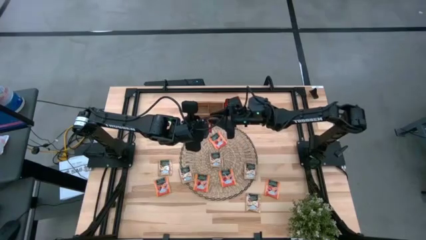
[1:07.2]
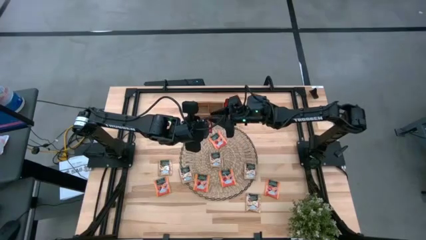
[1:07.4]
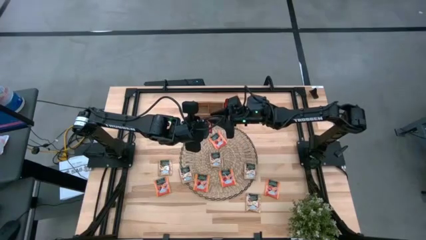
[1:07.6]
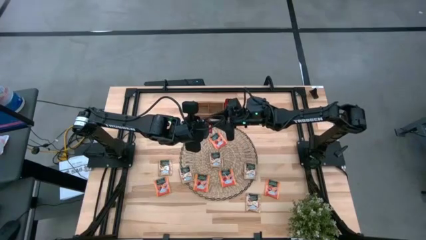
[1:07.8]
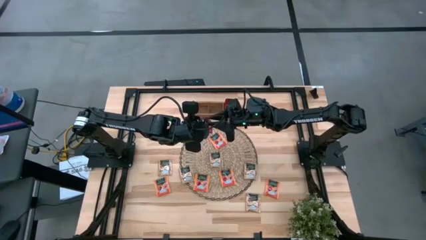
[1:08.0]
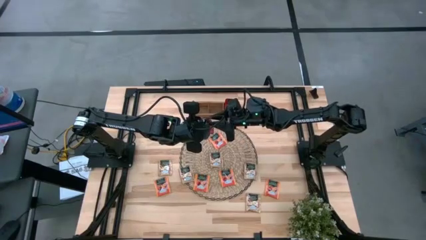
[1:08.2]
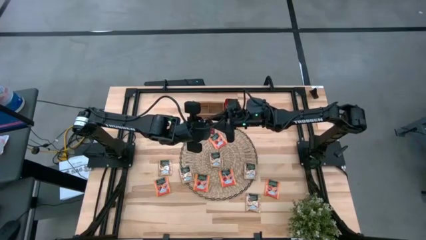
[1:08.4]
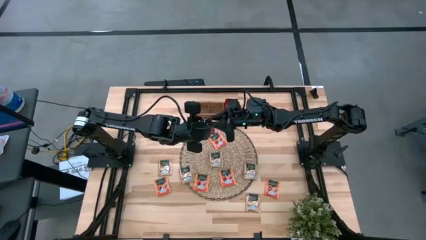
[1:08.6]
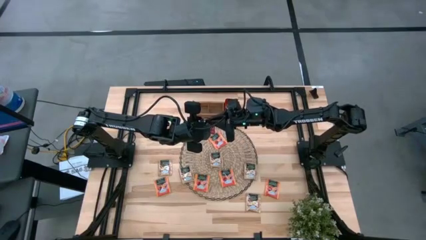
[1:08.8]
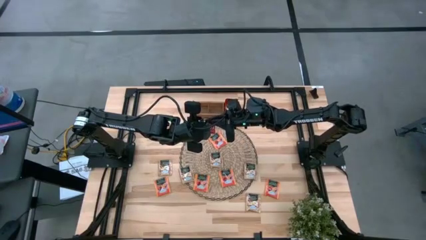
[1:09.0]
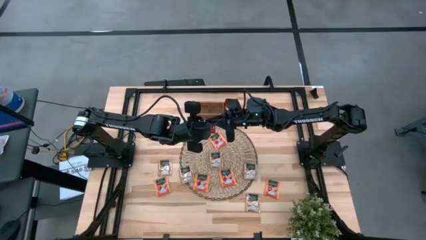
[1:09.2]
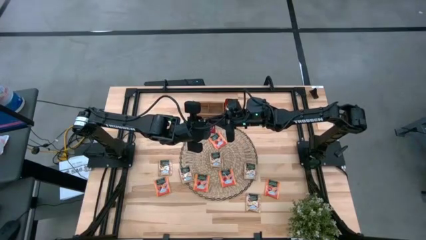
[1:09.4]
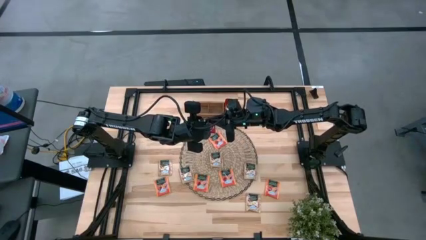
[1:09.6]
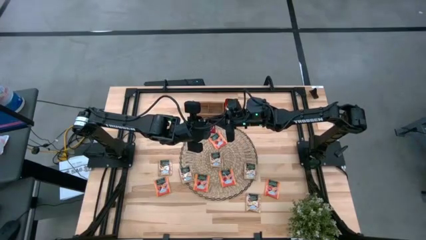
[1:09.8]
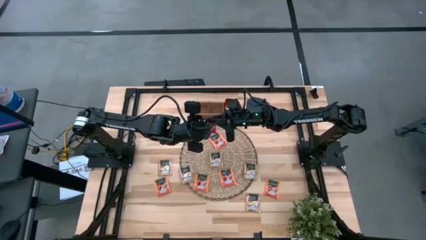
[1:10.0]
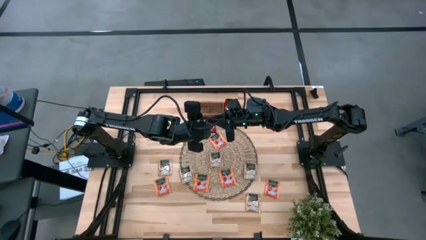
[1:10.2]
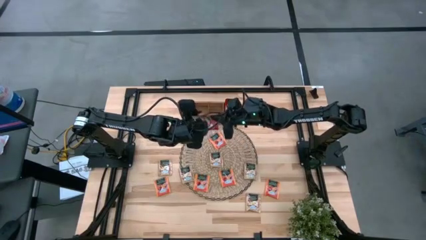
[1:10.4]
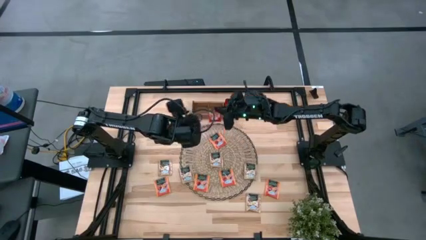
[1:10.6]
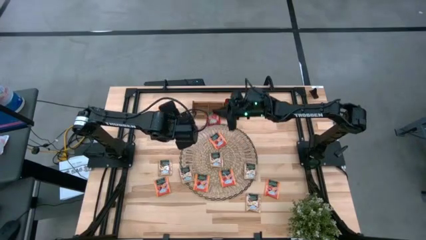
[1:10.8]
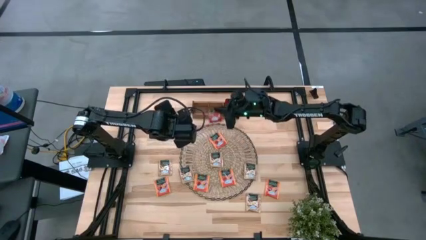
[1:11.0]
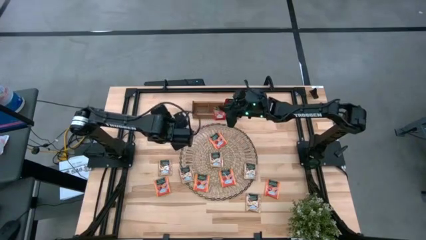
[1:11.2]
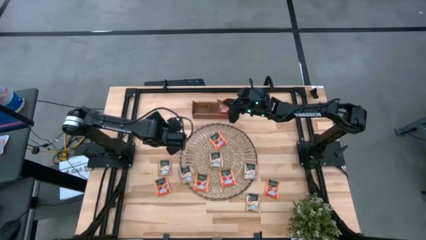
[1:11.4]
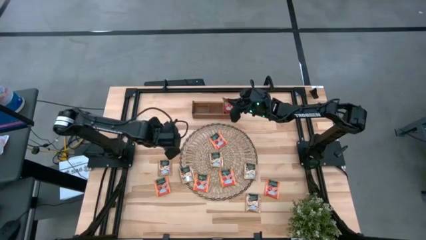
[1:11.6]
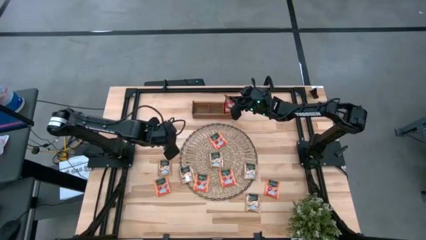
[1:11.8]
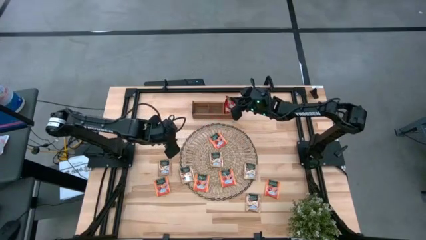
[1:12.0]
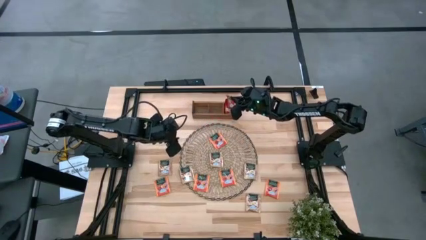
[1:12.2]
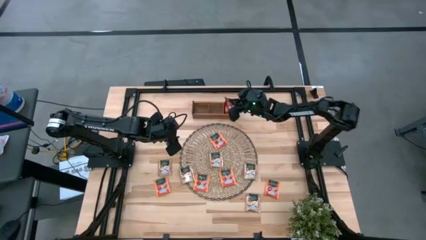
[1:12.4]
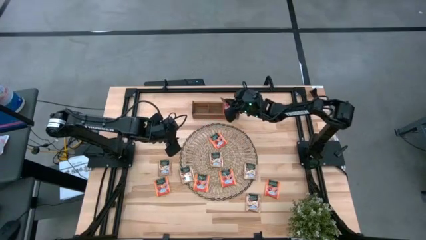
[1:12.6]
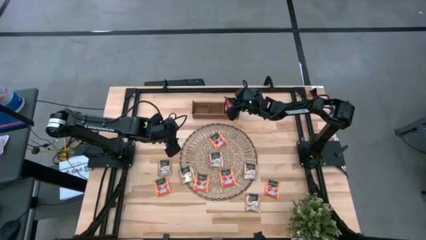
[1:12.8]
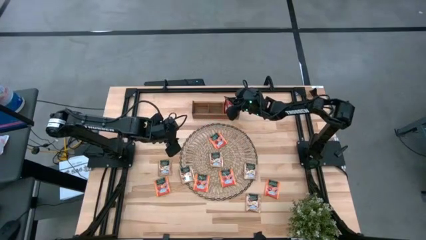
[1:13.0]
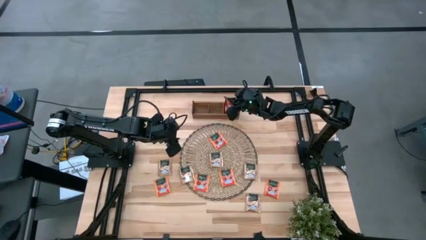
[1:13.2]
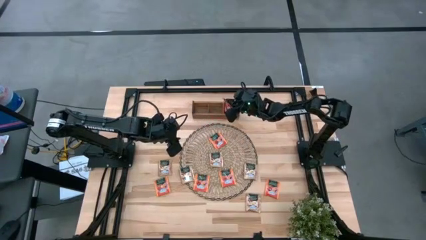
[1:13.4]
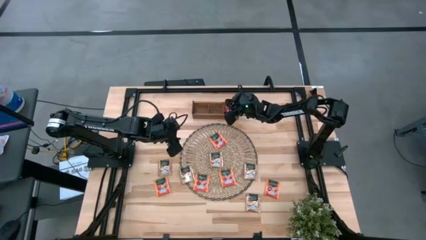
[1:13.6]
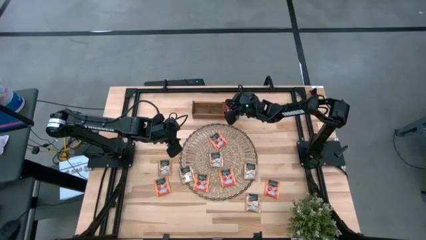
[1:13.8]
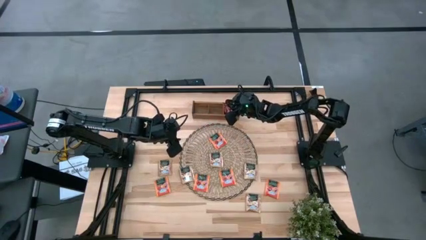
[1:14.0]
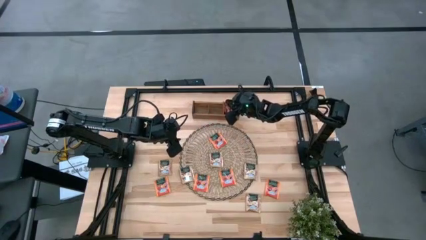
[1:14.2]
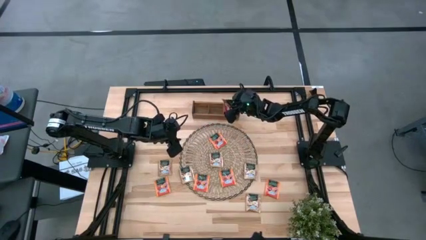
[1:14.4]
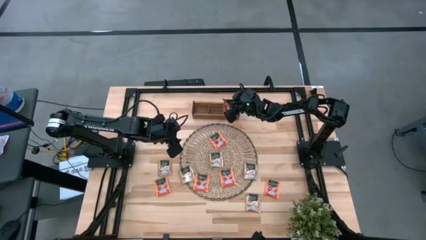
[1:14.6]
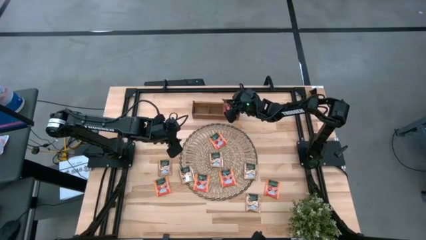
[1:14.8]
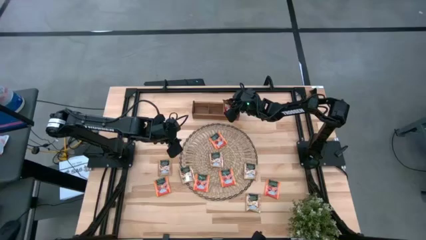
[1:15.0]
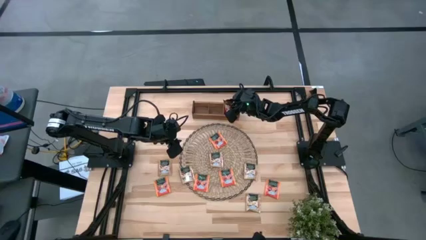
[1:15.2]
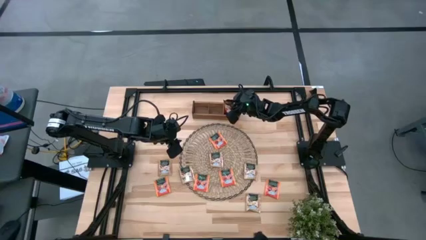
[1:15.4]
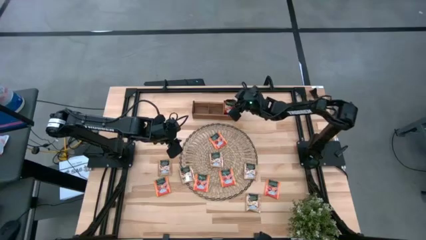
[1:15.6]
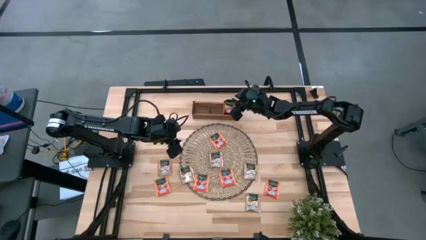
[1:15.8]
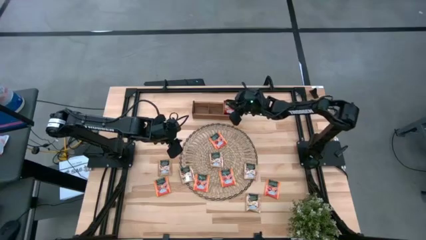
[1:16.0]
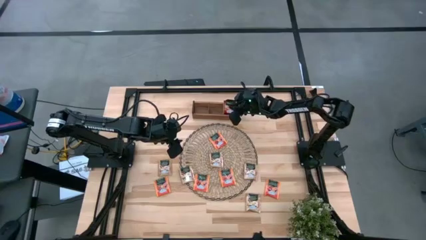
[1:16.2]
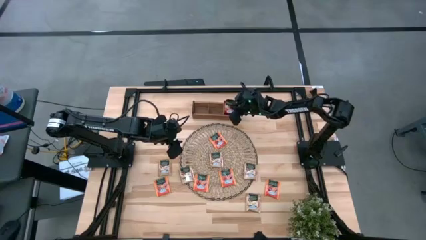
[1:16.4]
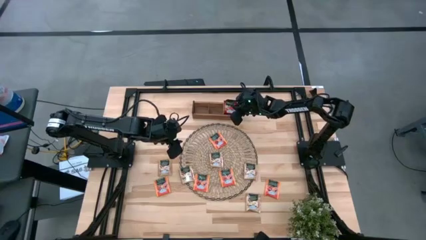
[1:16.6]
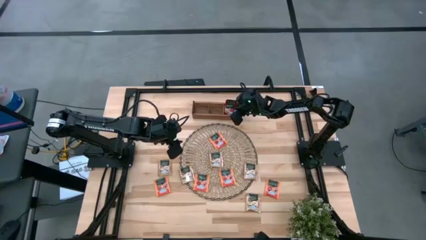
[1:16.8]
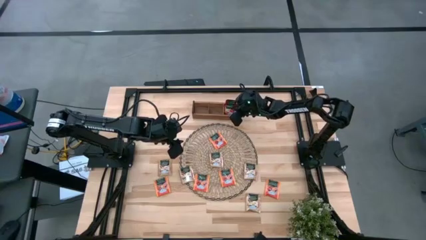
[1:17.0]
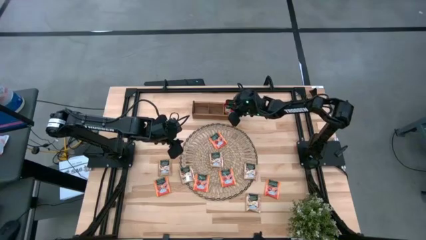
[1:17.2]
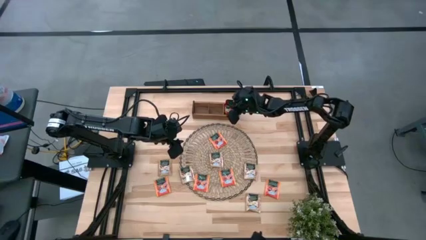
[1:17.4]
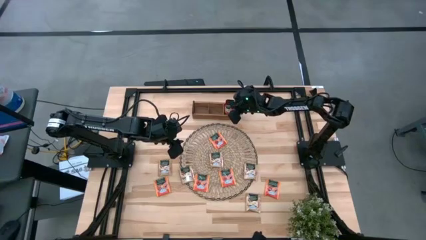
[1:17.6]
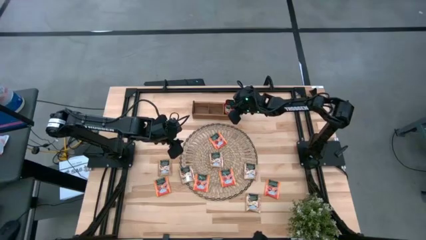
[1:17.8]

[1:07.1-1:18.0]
Task: Pick & Place Tea
Put the red tea bag into the right section of the wooden organizer

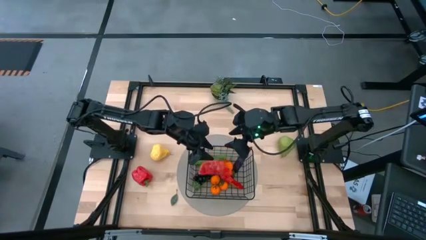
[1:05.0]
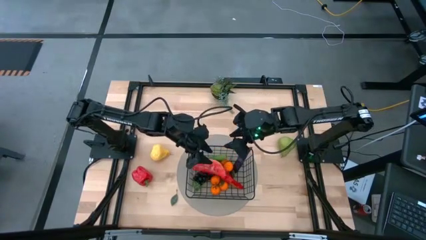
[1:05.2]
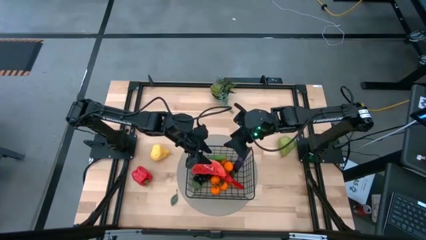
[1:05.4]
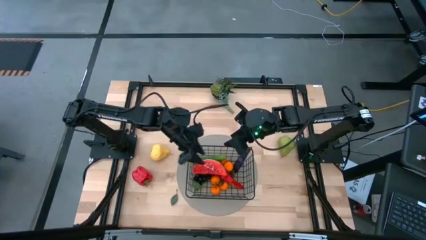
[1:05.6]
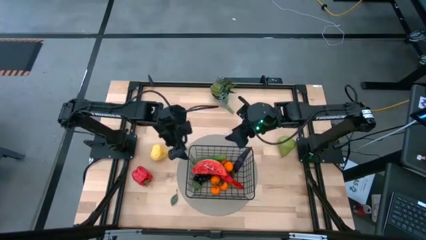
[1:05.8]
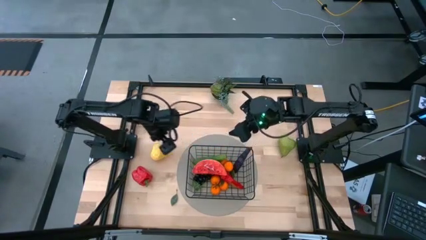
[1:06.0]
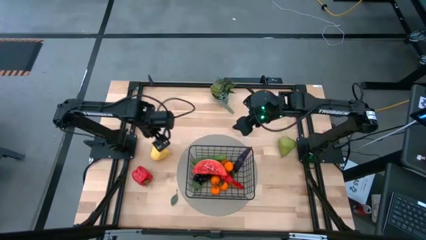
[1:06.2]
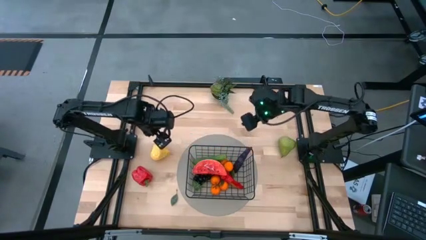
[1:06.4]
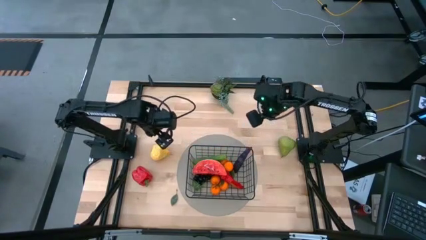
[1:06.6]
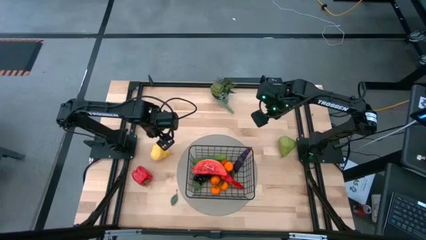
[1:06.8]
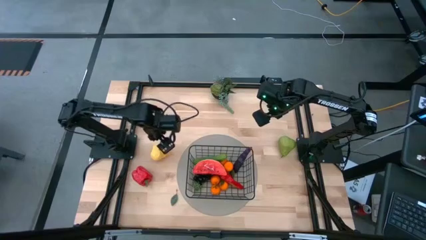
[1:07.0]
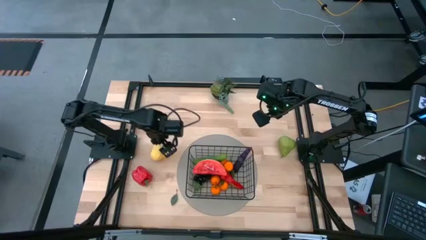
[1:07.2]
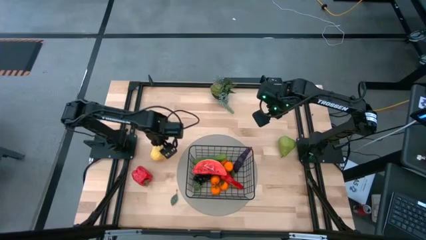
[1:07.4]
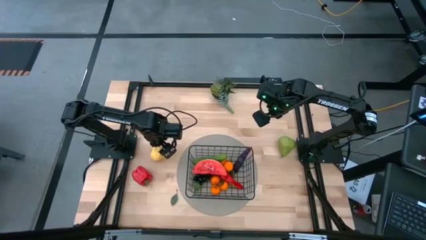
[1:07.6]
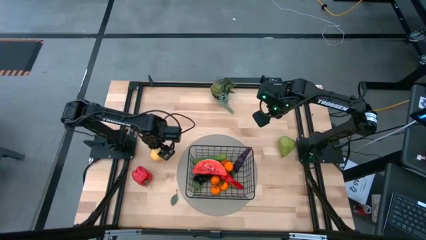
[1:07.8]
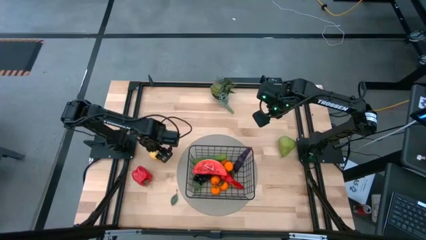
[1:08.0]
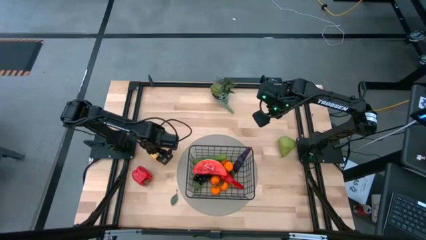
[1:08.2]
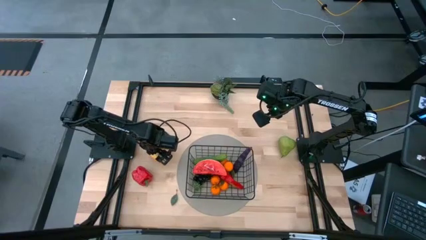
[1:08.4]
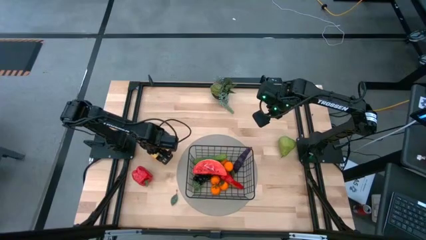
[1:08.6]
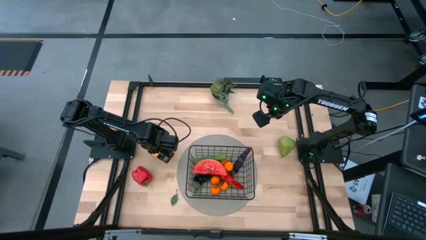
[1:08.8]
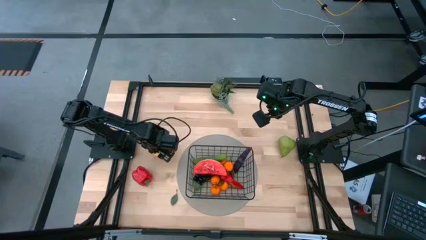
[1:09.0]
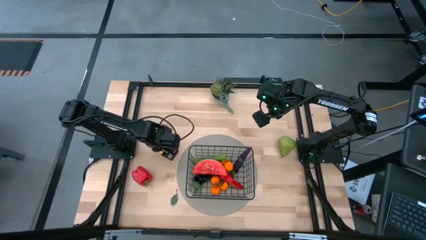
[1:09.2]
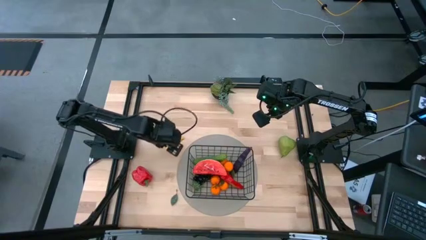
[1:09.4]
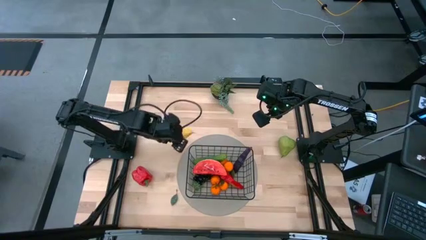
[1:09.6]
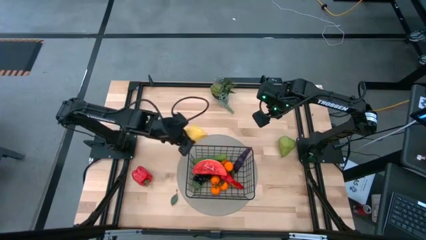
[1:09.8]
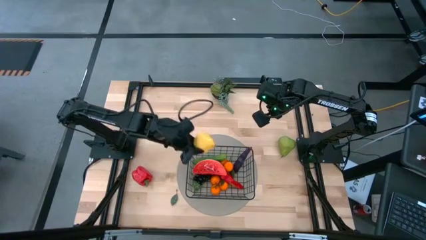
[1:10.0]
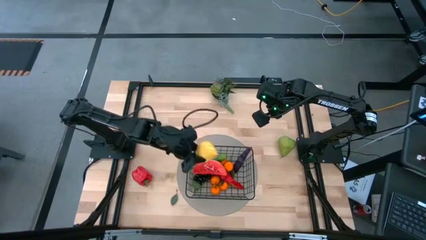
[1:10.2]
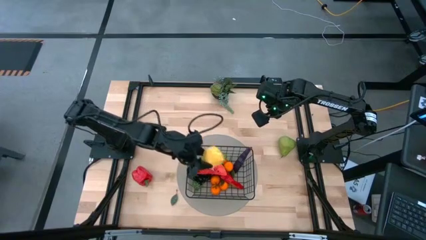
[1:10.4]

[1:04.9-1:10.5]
Task: Build produce basket
Put the yellow pear into the black wire basket
